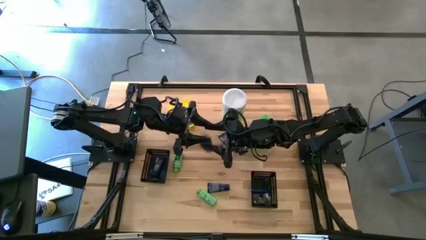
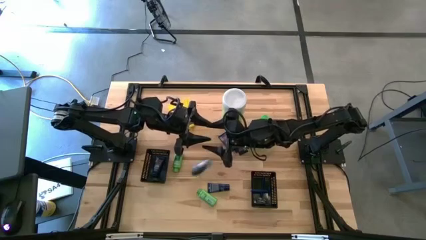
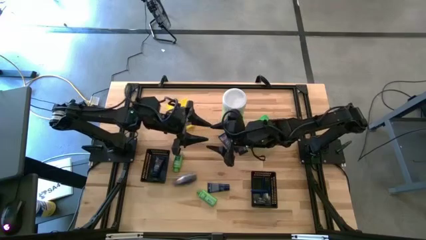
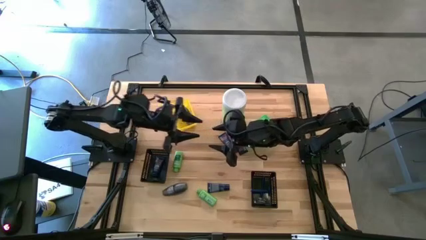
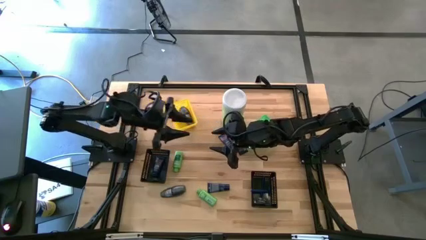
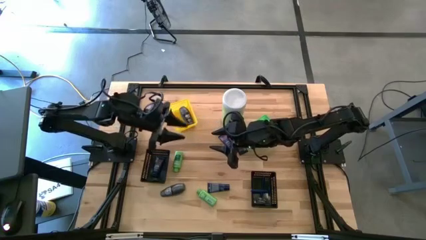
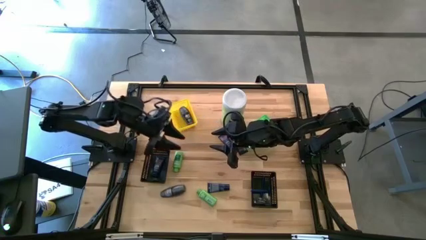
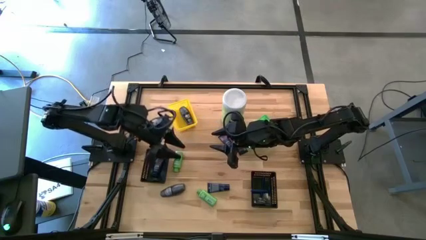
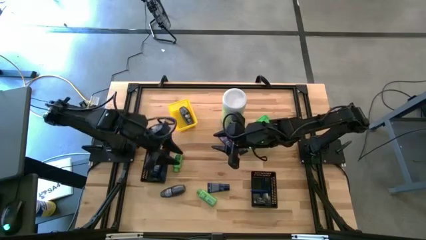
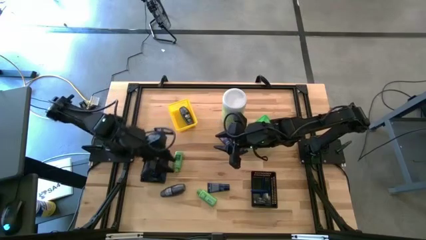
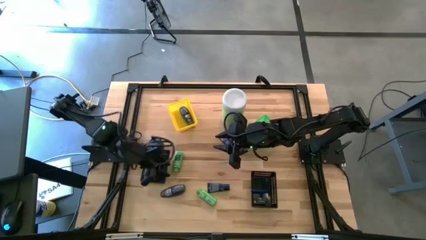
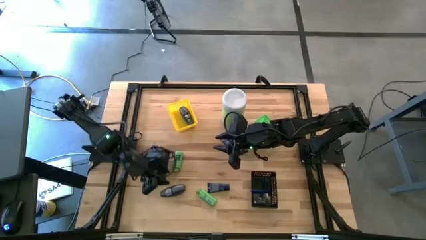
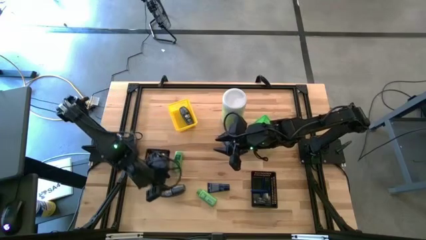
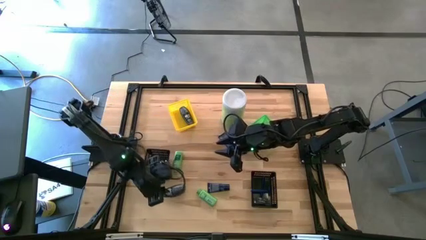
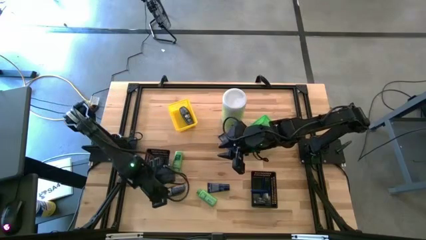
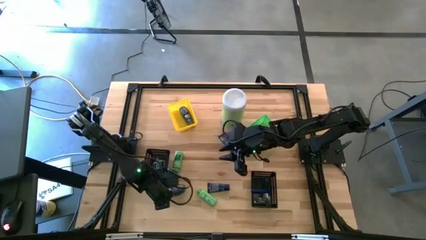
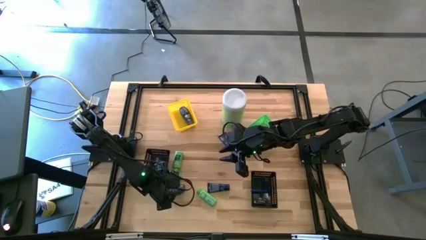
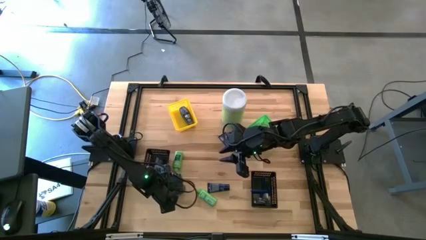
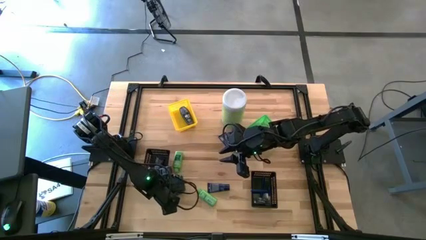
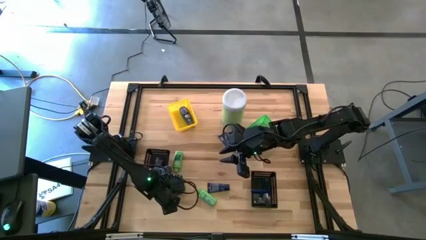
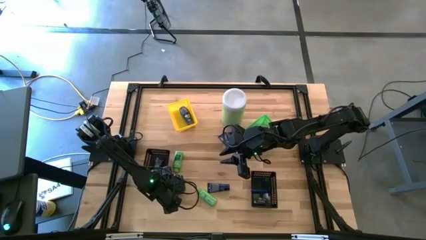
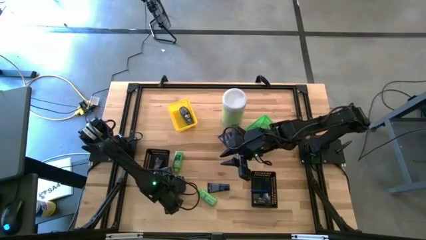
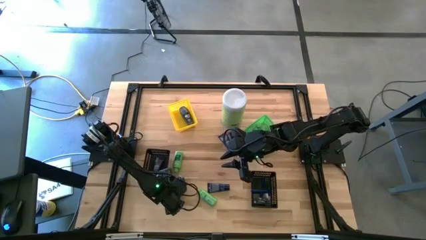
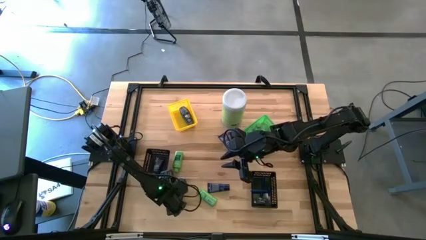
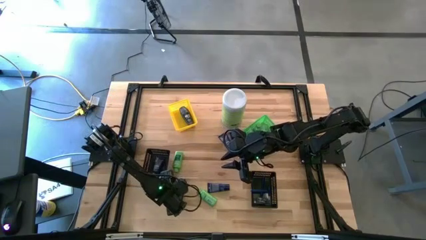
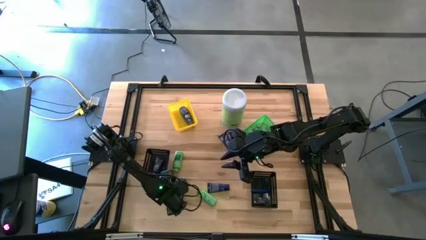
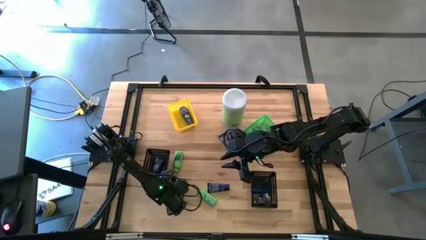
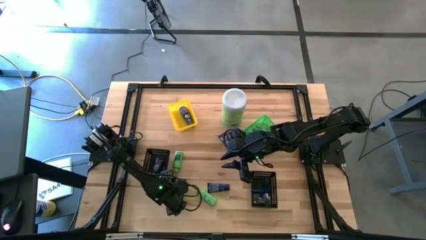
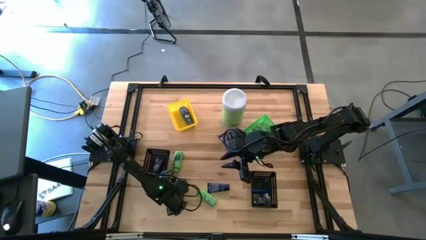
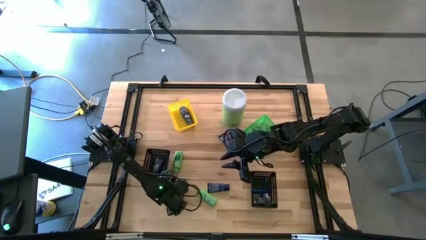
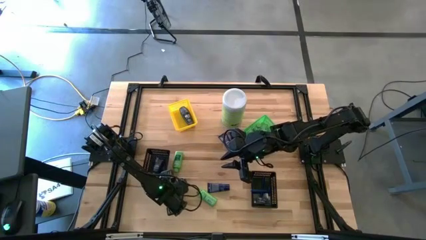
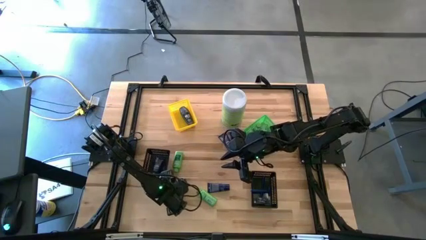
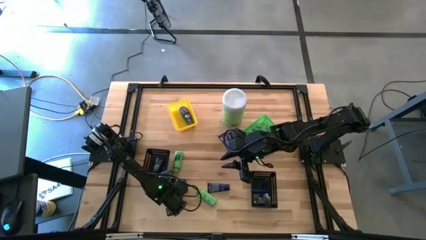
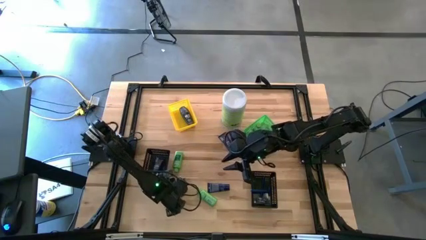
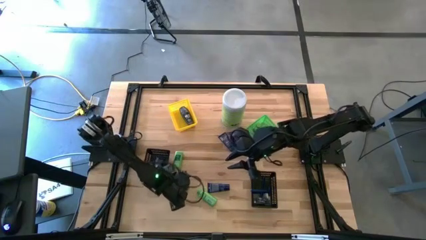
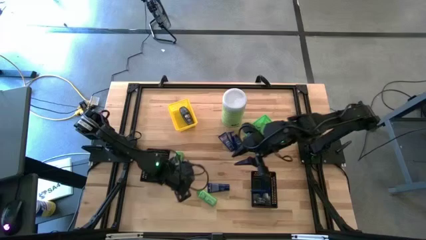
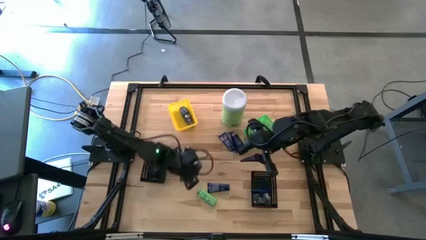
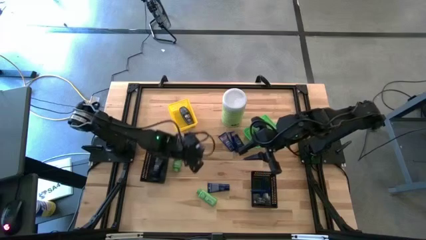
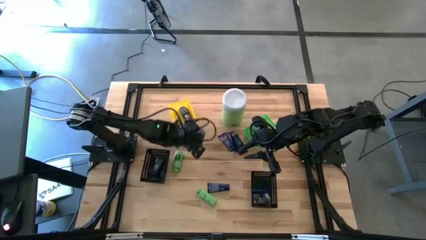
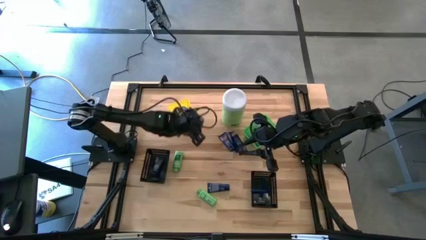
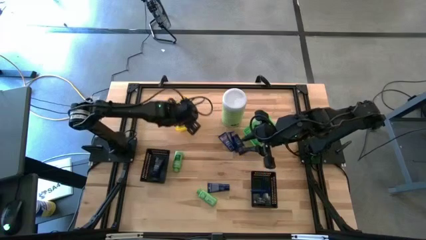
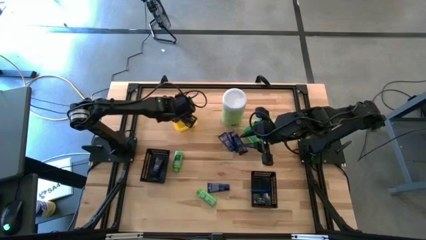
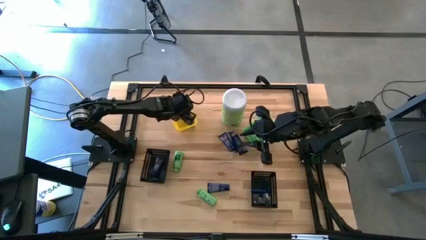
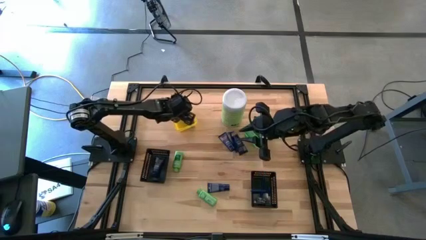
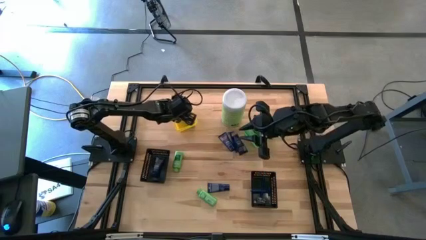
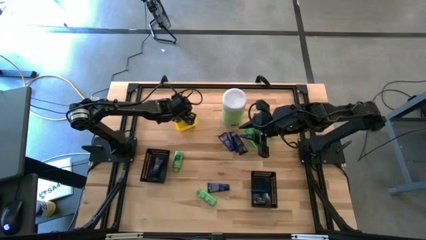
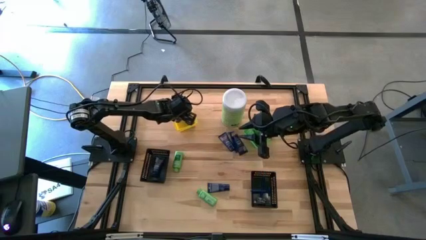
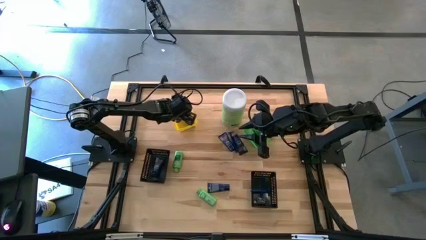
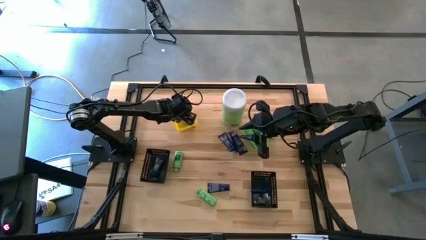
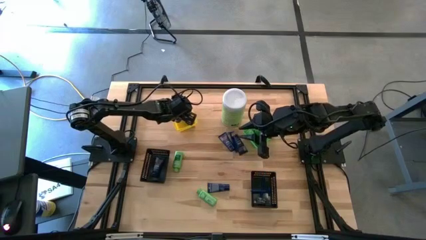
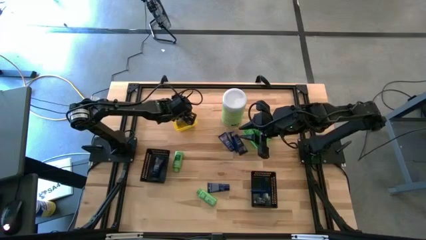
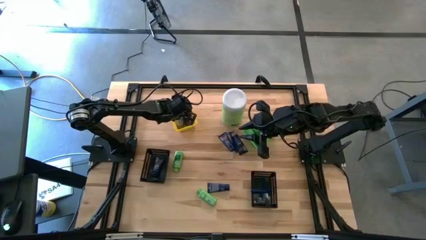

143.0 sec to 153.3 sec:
Task: Pick & Place Travel size toiletries
Put the deodorant into the yellow bin

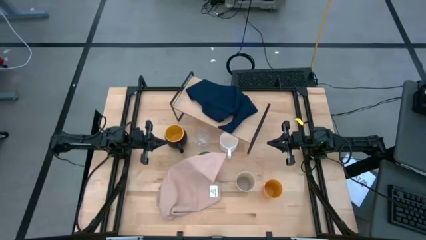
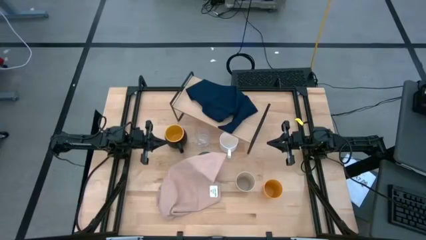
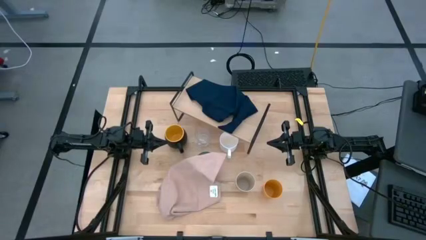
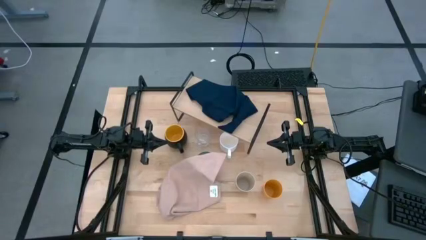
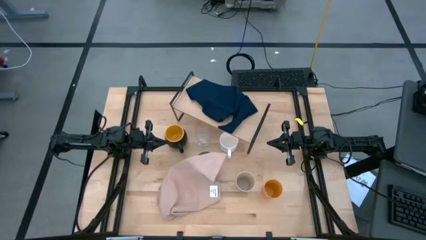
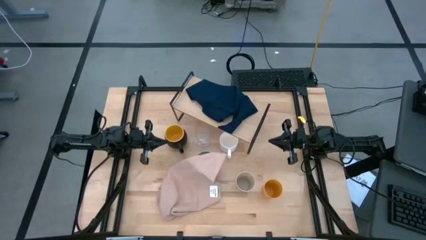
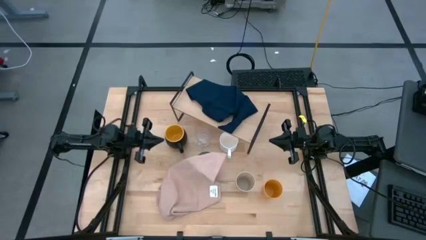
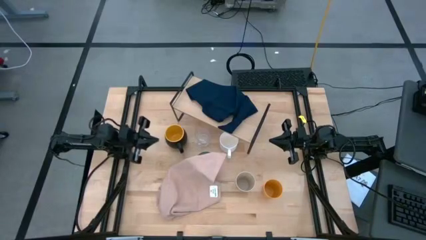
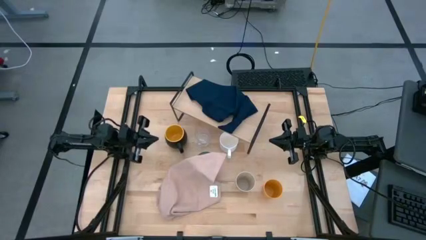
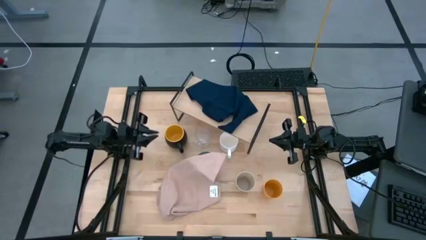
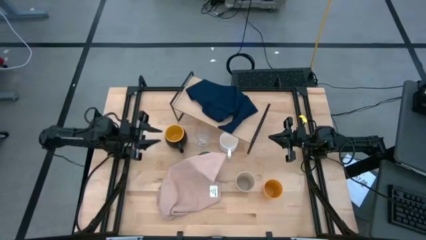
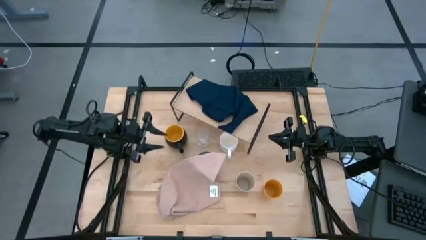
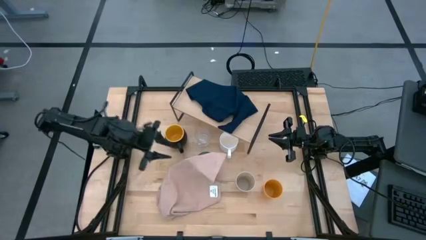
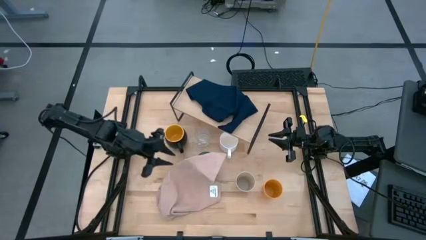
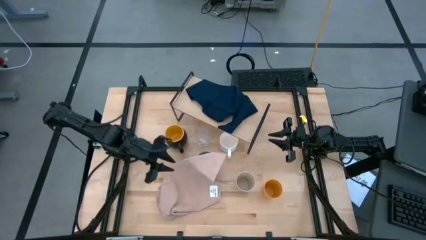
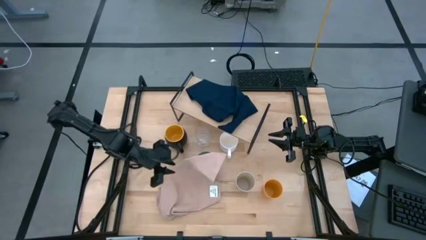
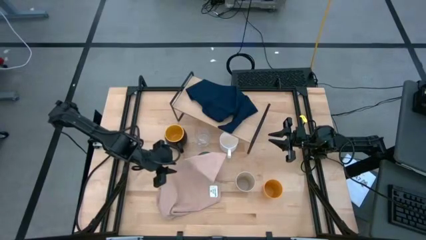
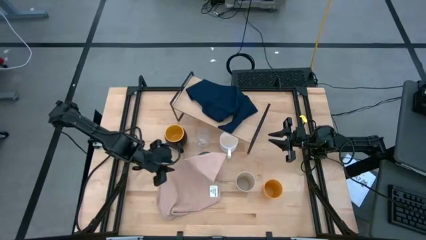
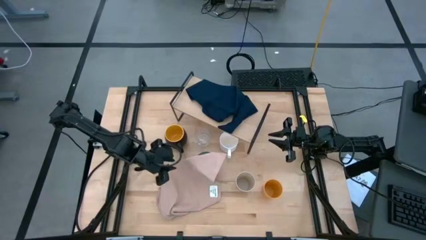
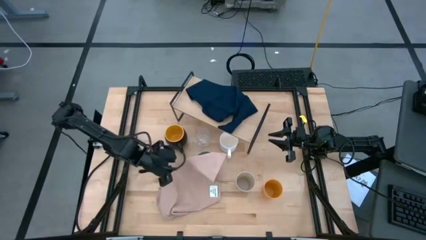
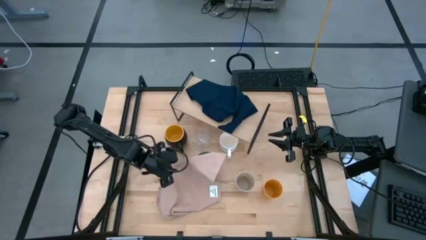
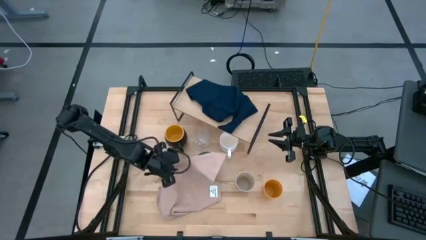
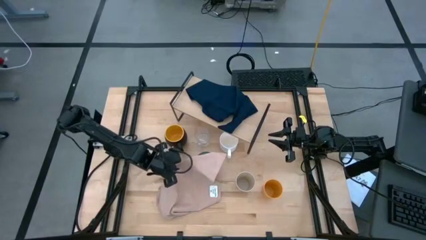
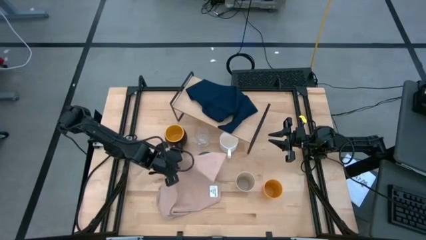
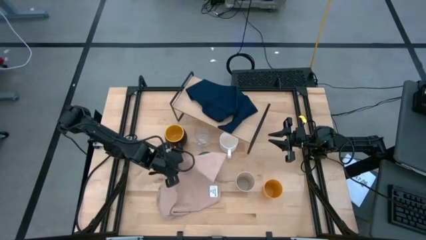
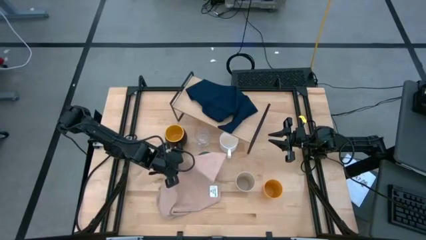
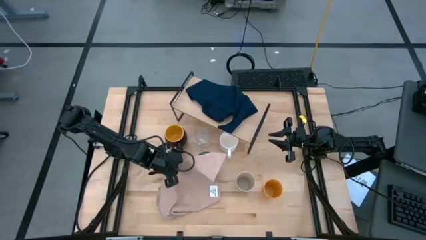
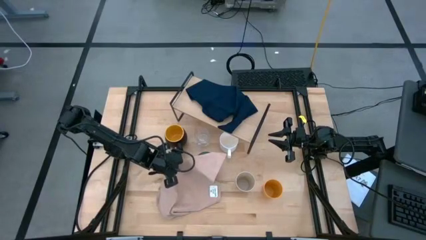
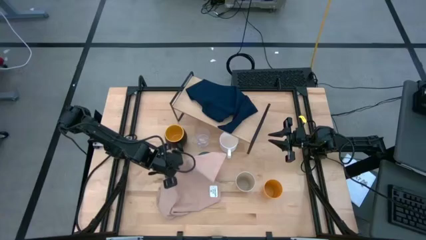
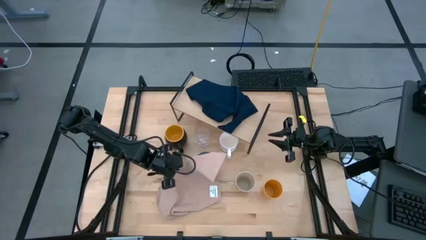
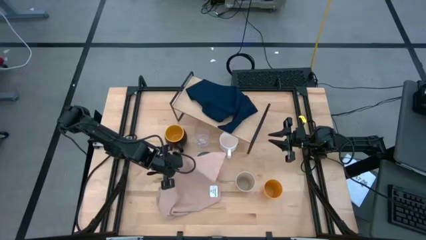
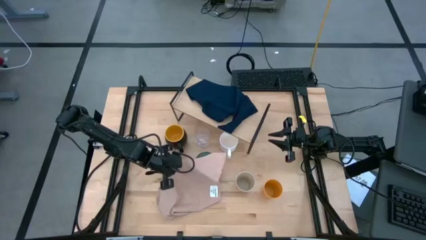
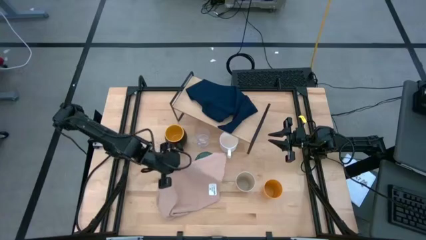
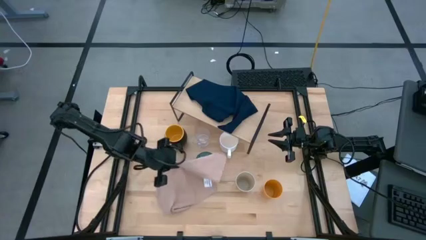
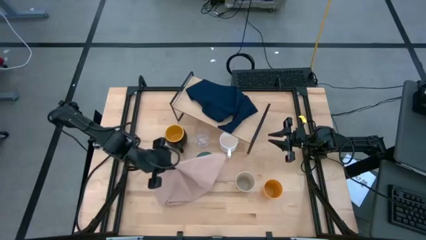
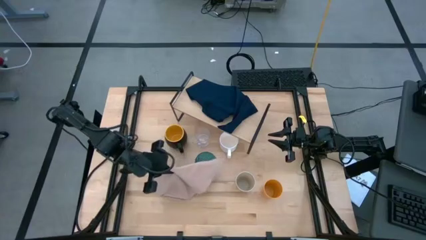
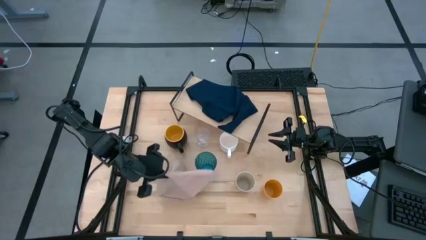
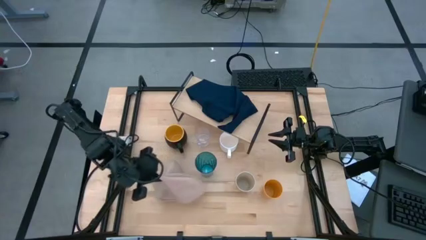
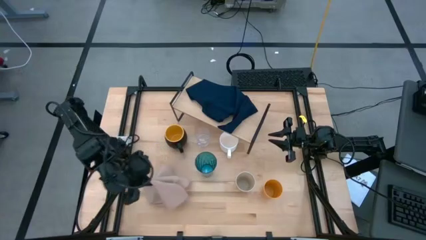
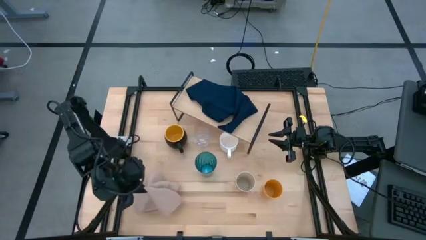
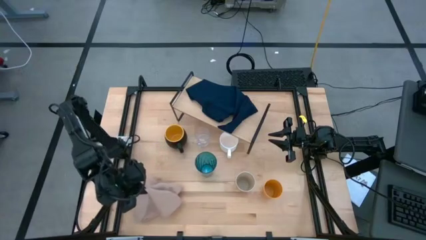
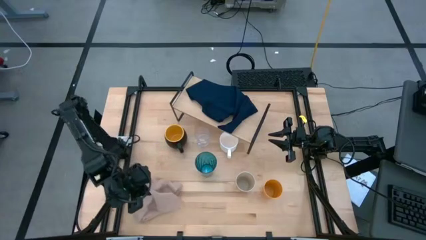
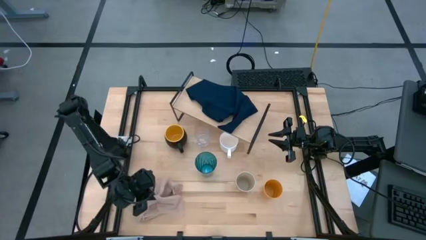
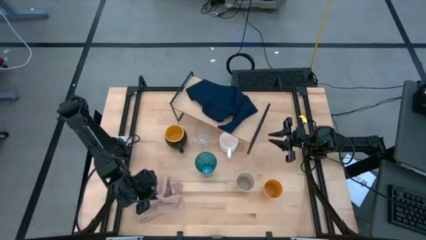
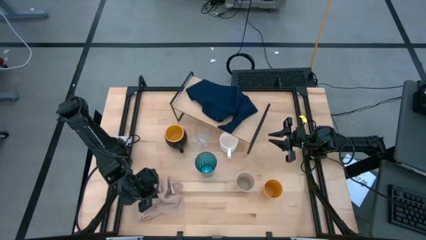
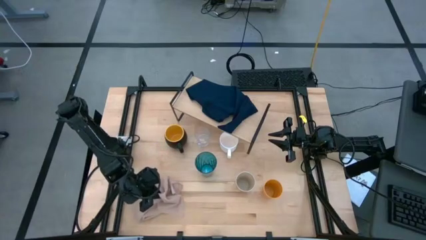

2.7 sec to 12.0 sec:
Task: Stack small to large cups/mugs on shelf
Adjust the light brown microfiber cloth
